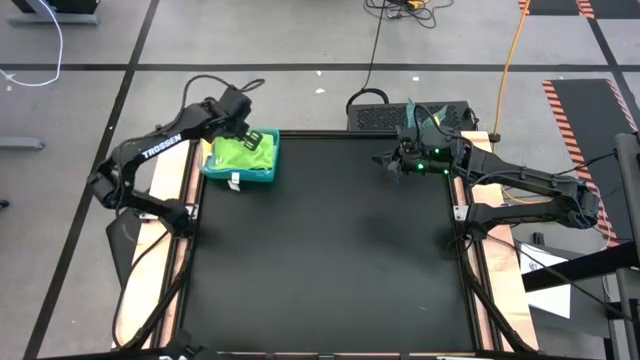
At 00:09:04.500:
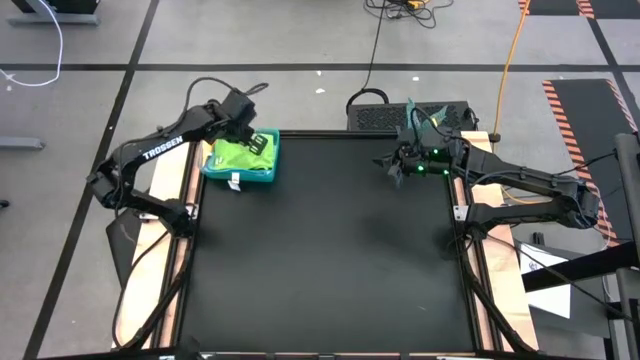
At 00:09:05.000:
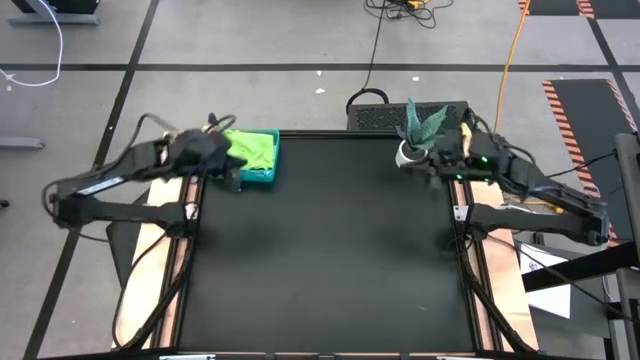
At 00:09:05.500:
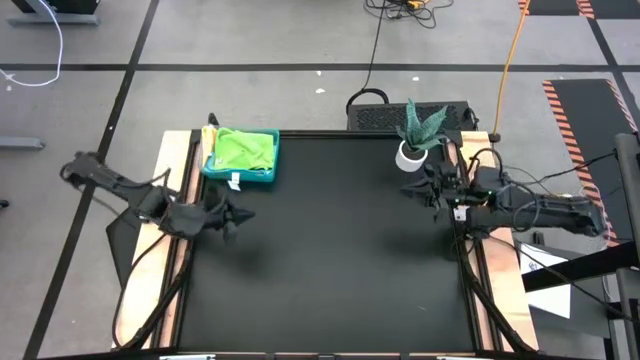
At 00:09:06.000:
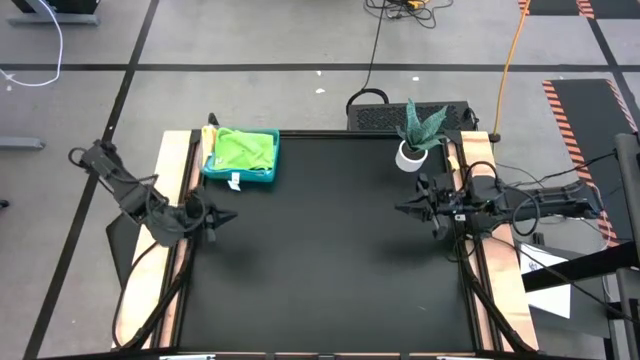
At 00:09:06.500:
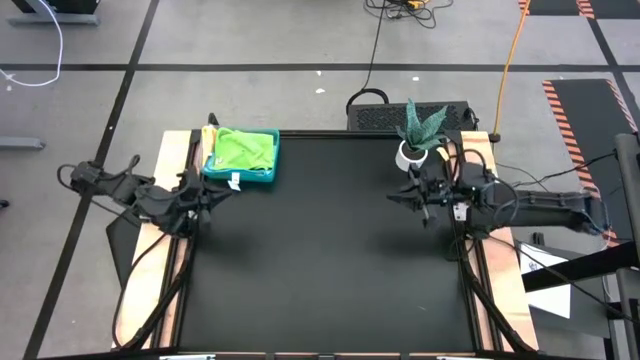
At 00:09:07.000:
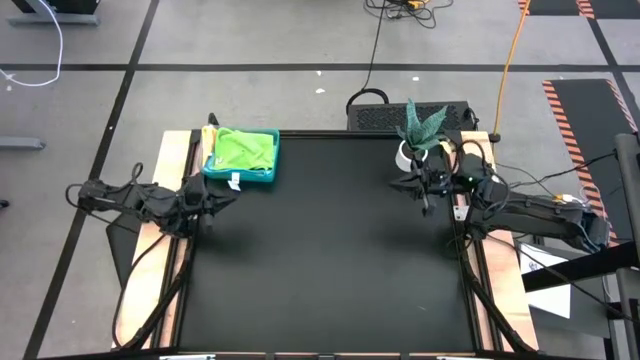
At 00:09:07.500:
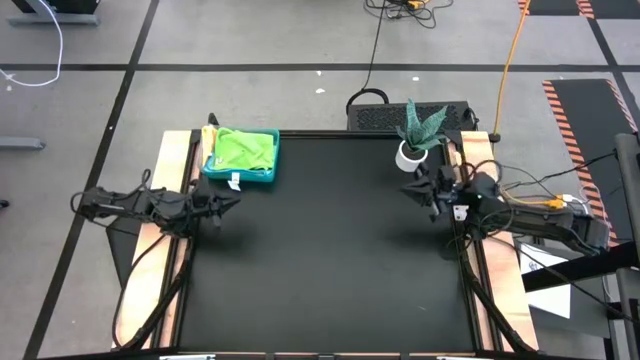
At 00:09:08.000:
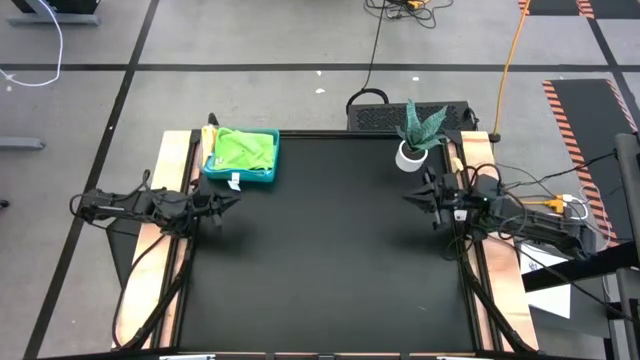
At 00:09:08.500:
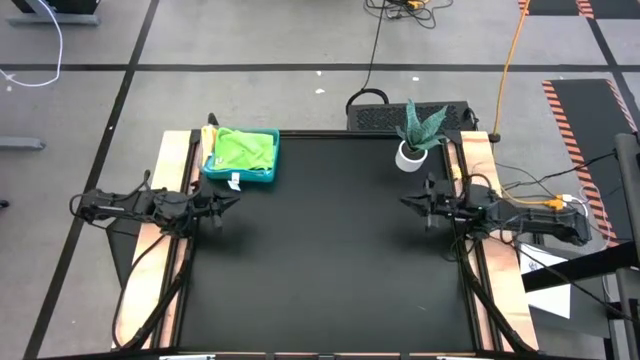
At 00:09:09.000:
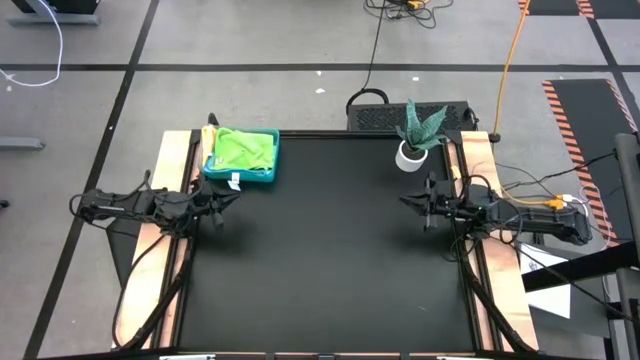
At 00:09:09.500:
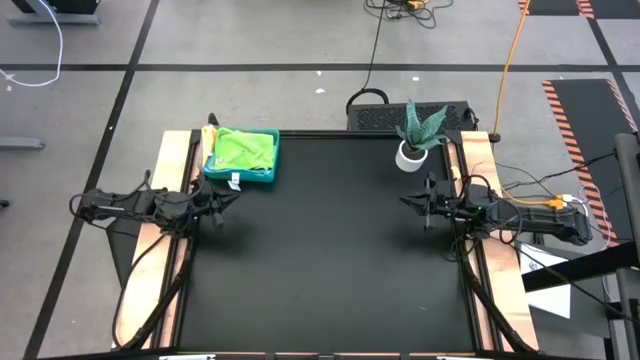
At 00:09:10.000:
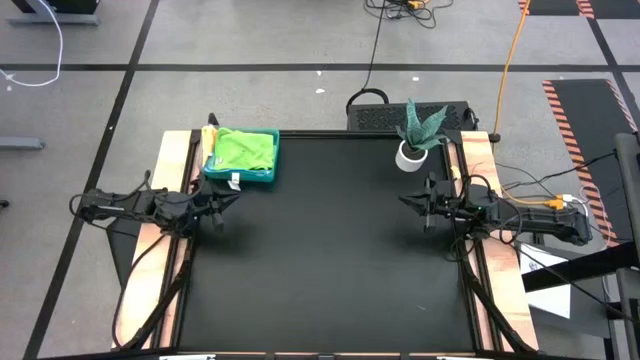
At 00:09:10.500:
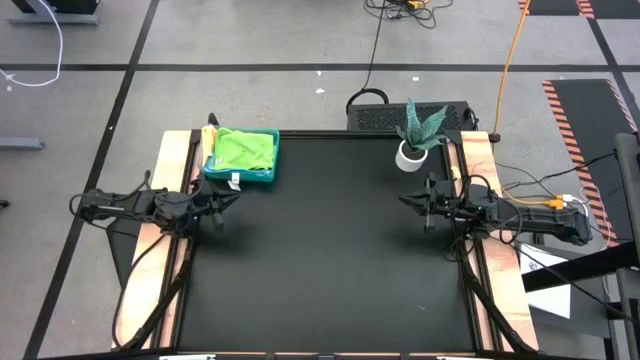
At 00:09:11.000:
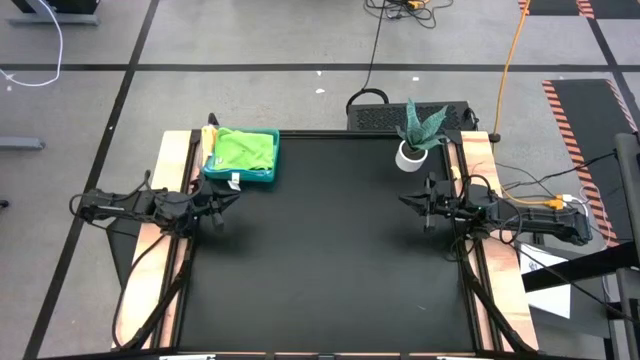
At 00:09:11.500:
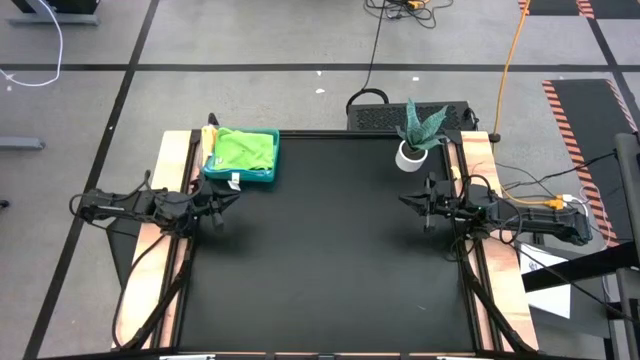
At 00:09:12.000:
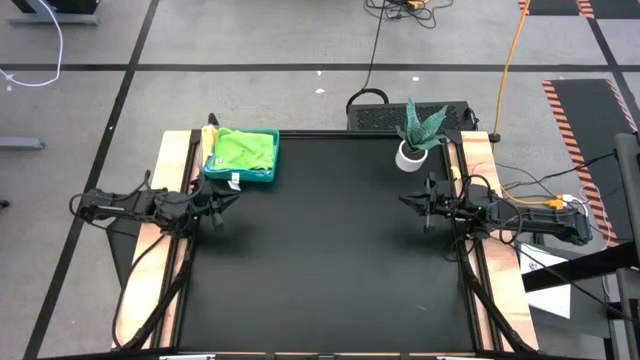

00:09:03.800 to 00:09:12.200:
Task: Fold microfiber towels
Return to Home Position

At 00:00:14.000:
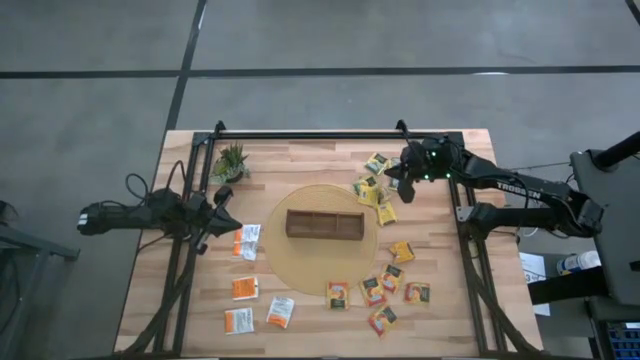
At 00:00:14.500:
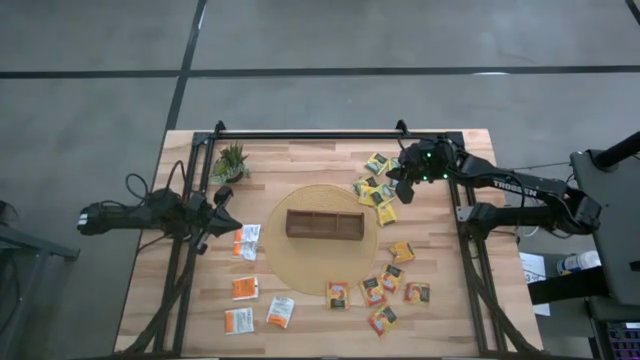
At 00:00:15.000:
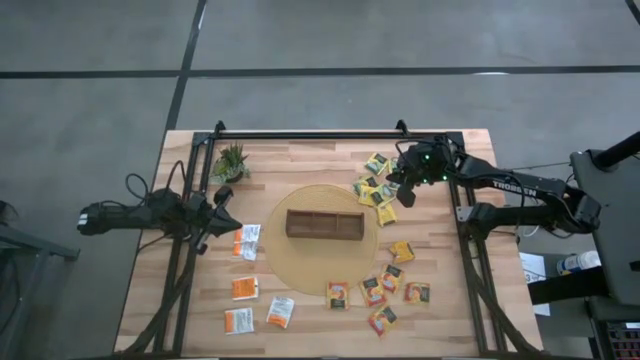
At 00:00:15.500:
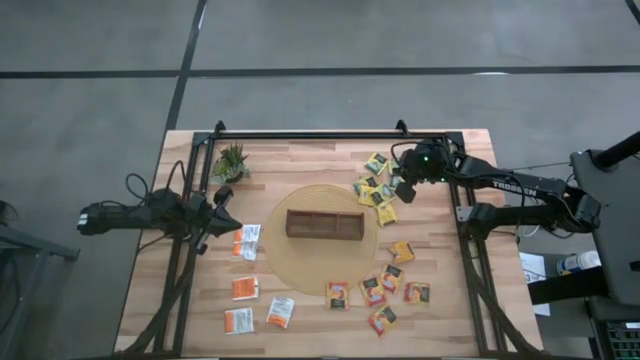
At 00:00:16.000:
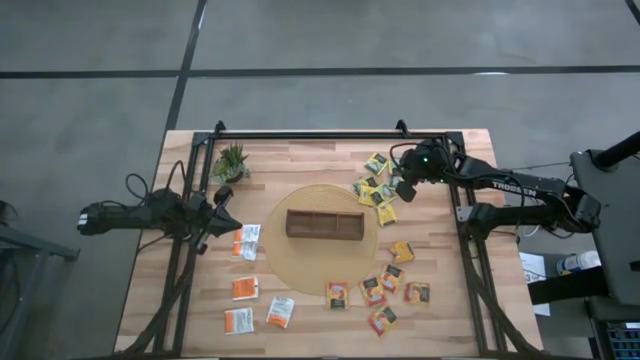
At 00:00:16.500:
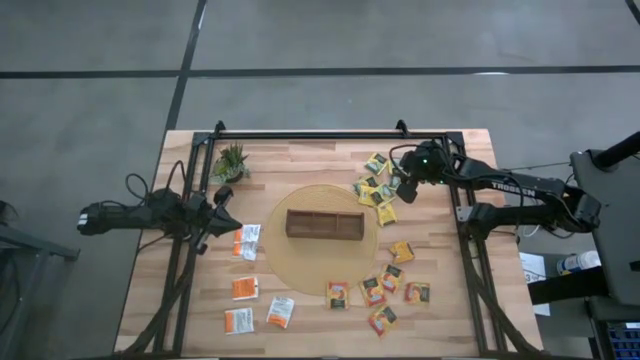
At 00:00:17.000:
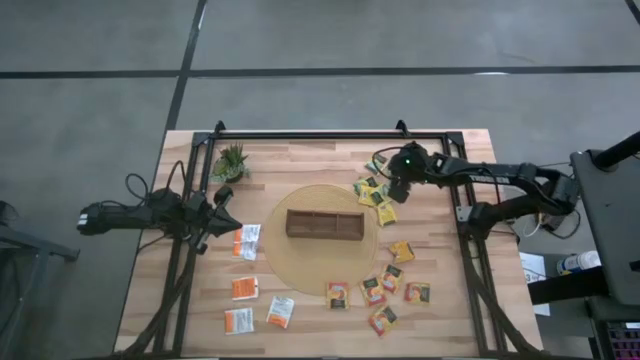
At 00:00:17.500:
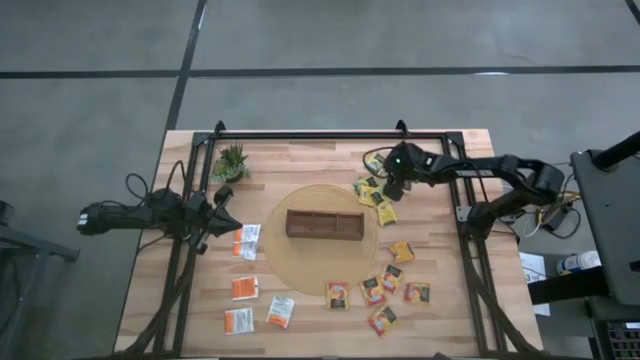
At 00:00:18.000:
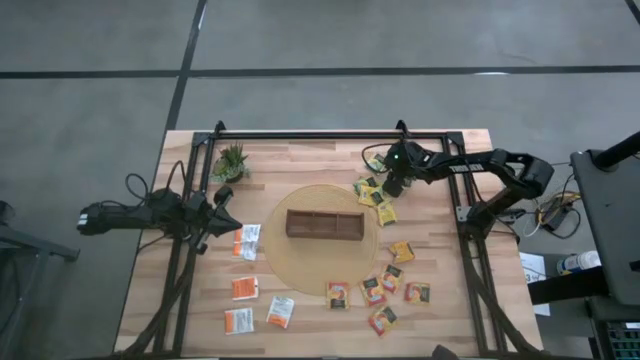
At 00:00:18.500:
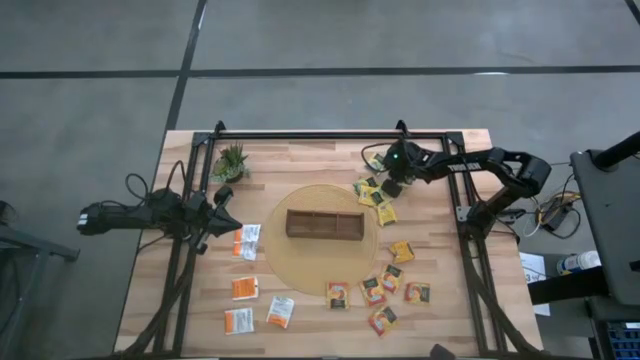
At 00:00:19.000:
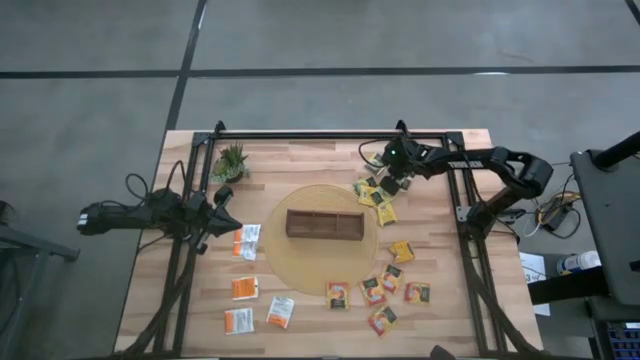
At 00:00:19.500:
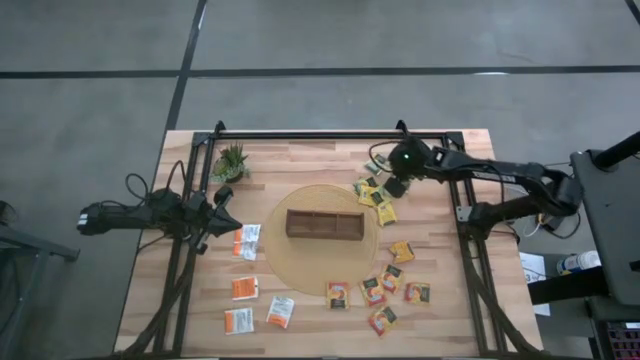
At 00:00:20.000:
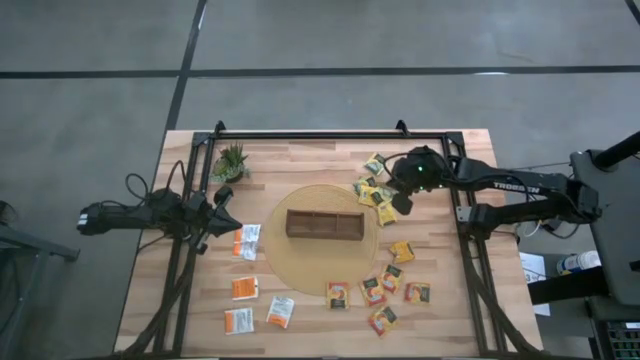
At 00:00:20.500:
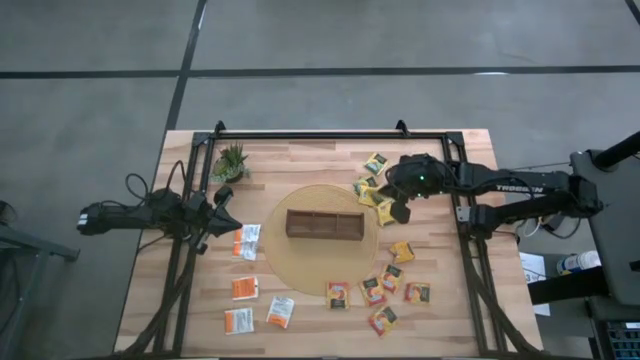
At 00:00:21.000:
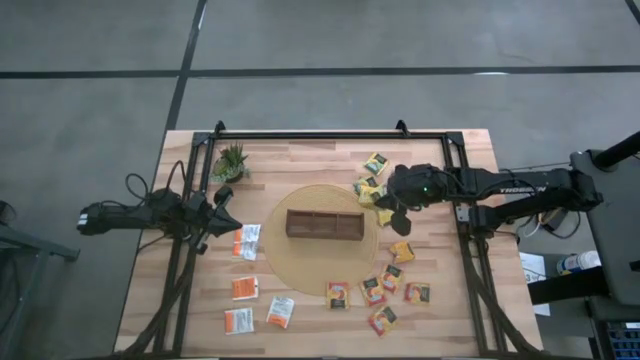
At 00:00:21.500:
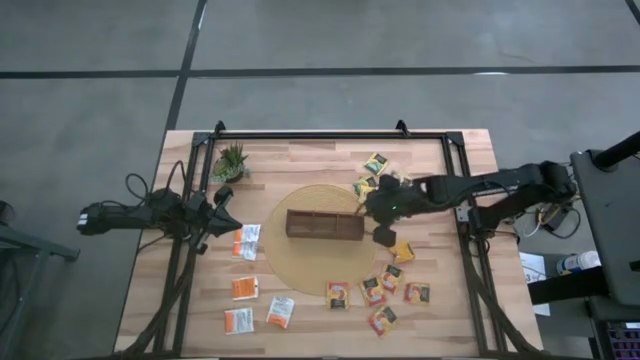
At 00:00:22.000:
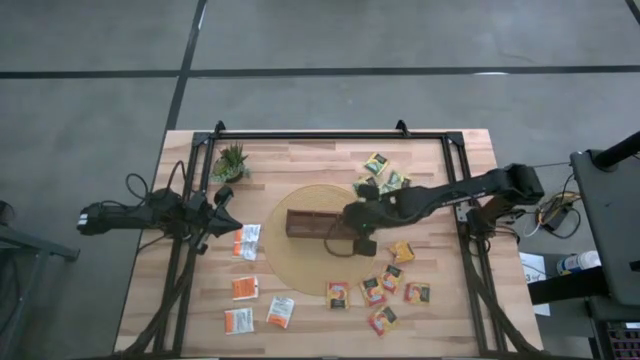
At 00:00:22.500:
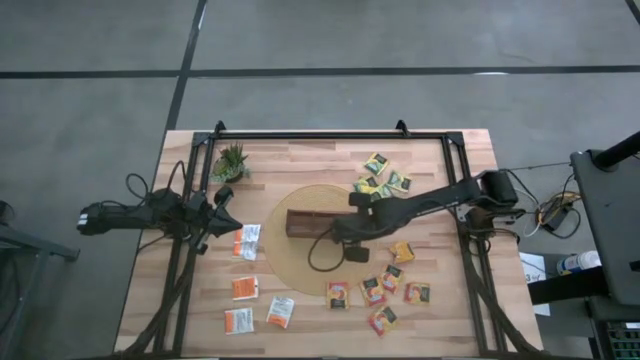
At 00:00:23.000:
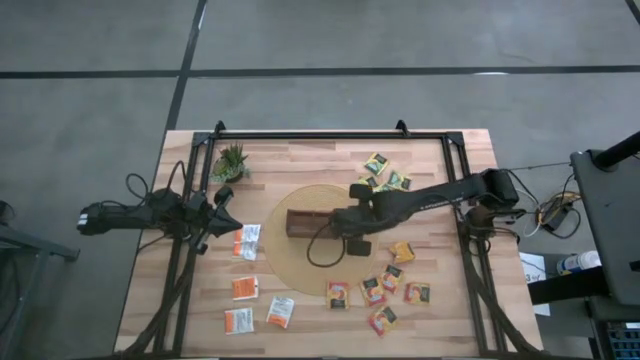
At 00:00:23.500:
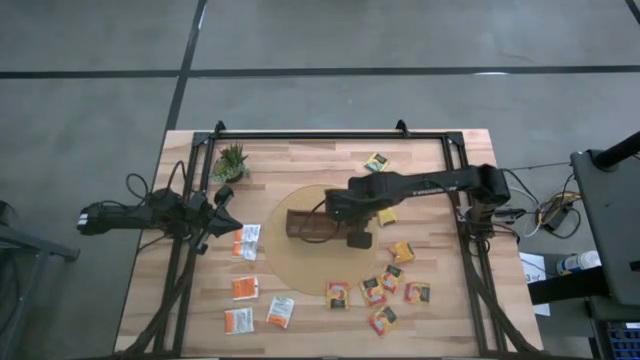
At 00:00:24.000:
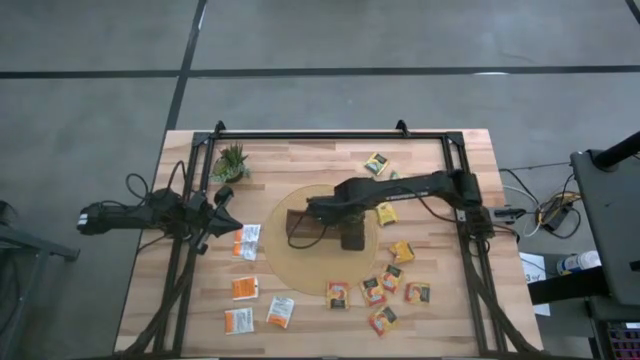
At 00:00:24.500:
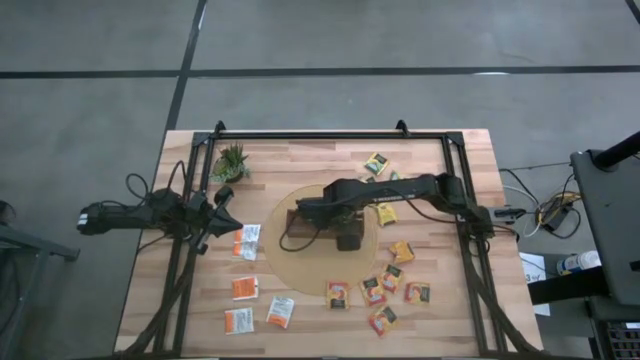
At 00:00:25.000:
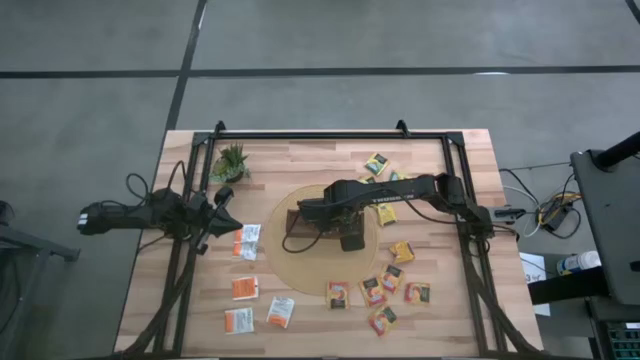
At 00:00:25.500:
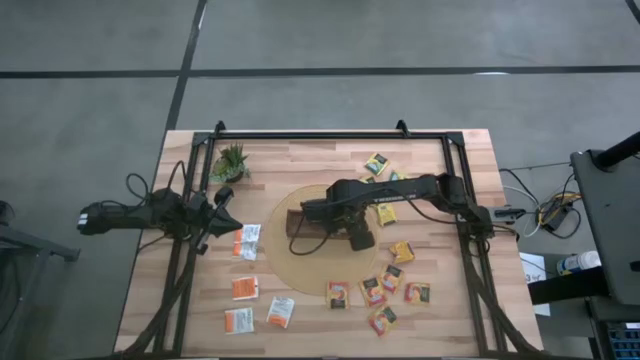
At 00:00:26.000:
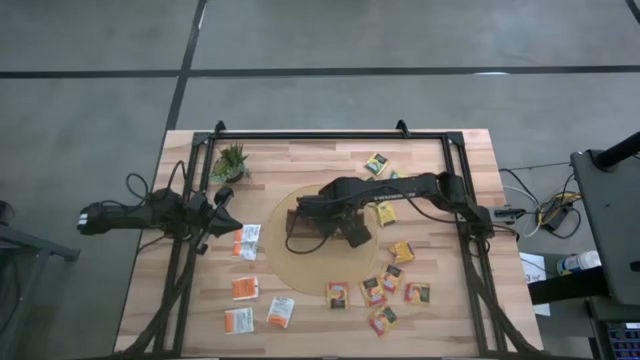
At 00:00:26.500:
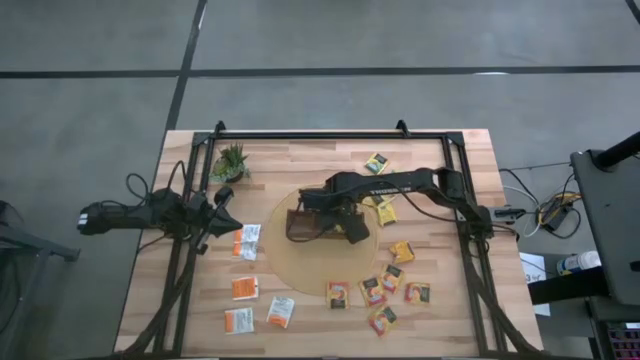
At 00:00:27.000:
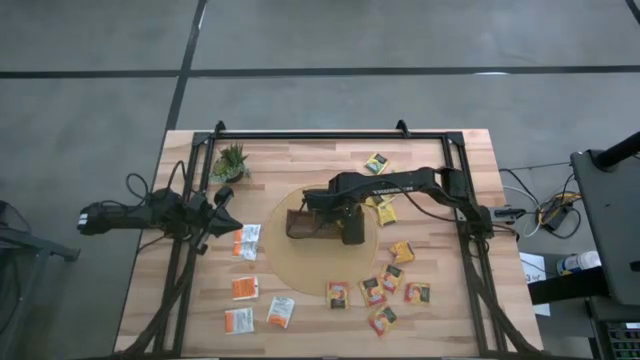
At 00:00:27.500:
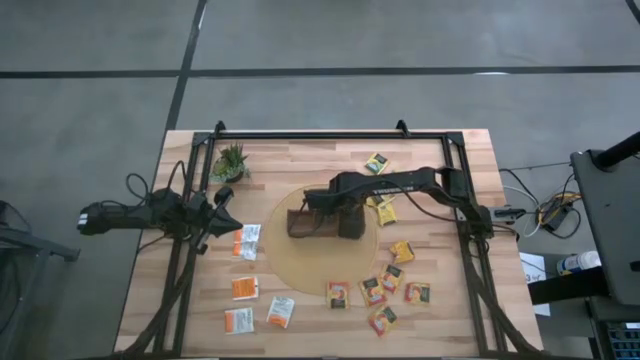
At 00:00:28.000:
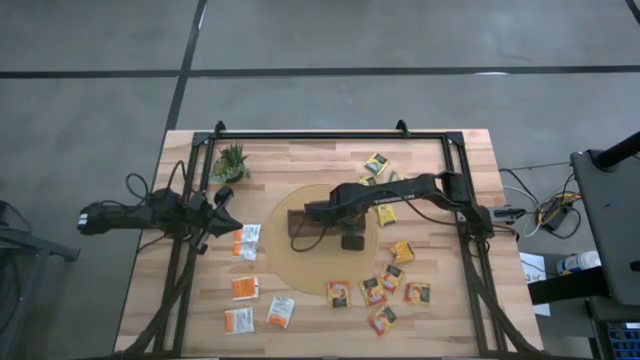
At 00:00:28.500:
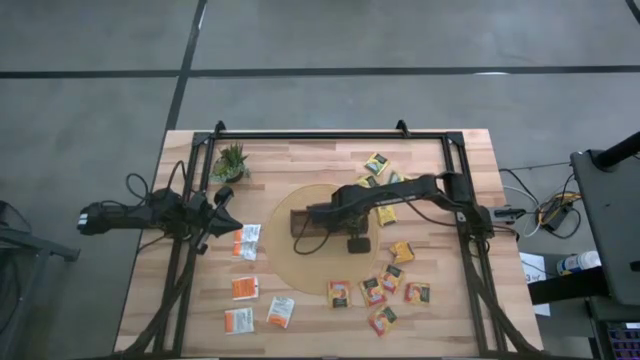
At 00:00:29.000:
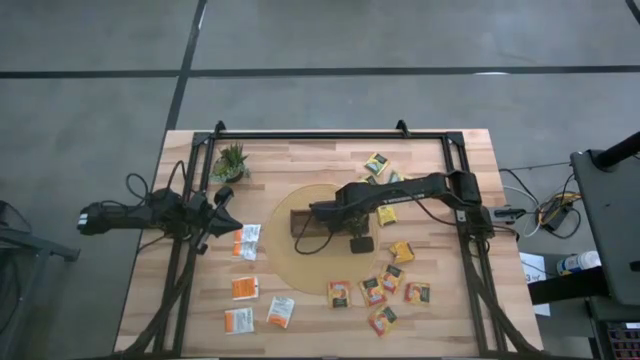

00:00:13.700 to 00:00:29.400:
Task: Pick & Place Tea
Put the yellow tea bag into the right of the wooden organizer
